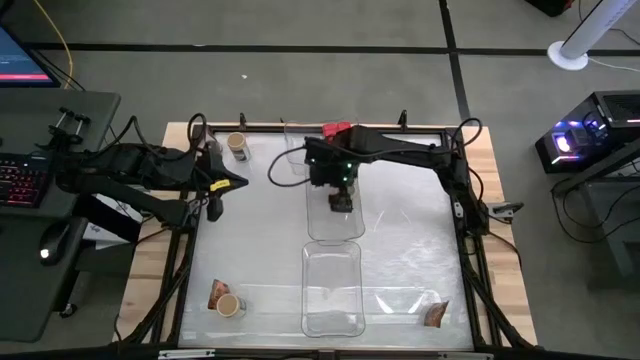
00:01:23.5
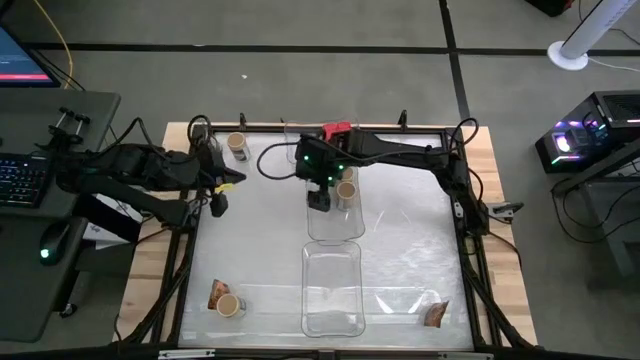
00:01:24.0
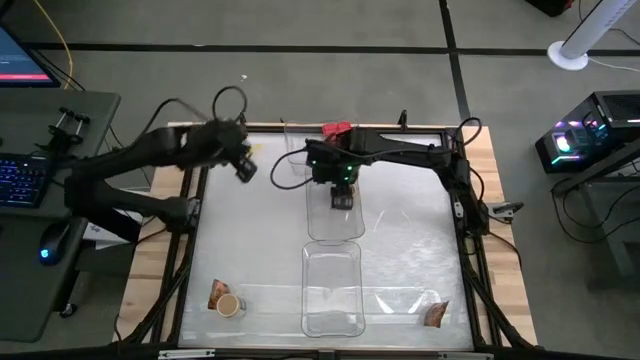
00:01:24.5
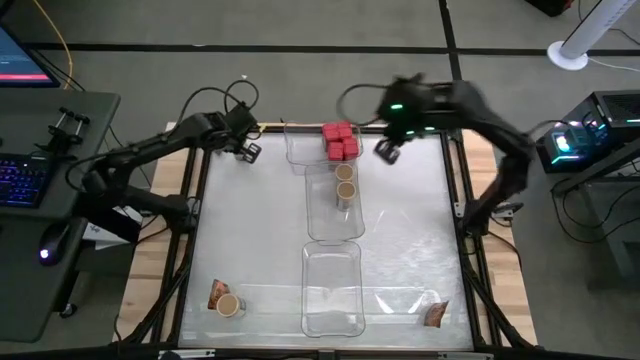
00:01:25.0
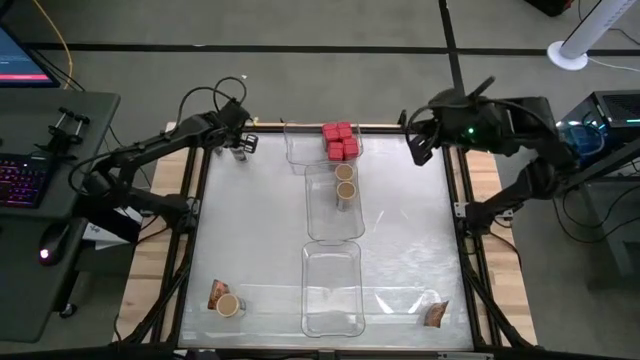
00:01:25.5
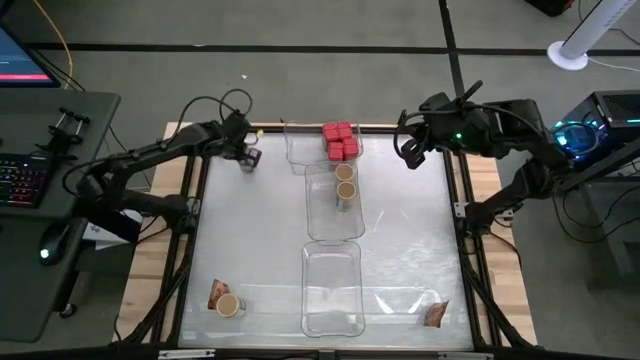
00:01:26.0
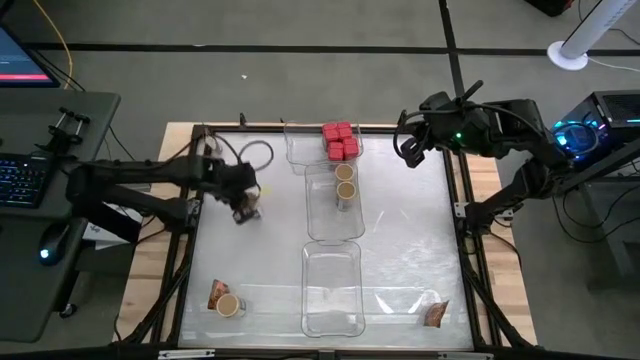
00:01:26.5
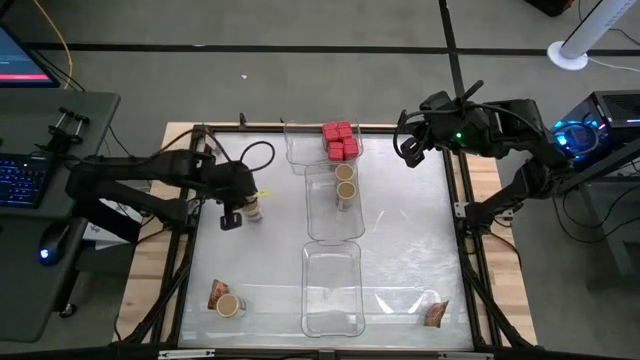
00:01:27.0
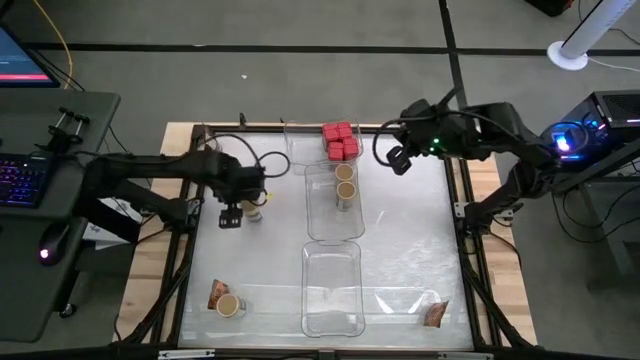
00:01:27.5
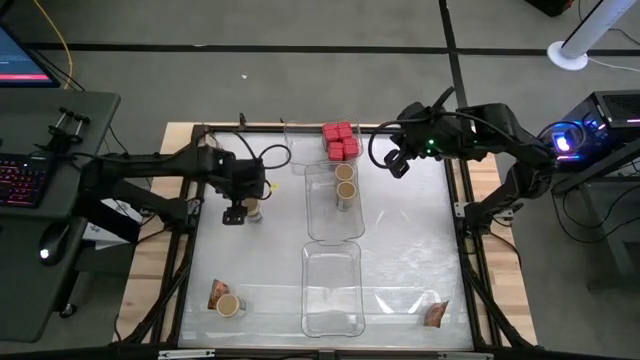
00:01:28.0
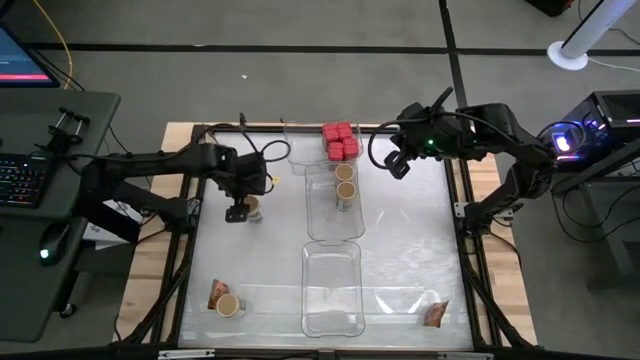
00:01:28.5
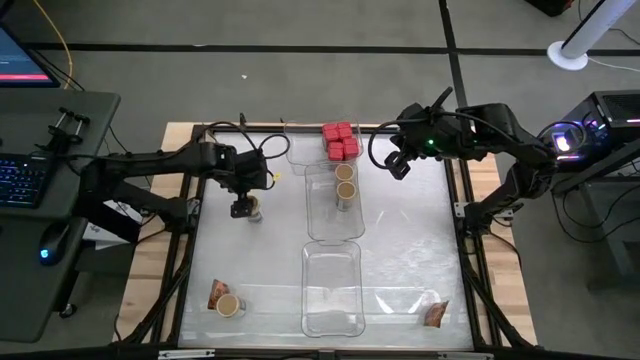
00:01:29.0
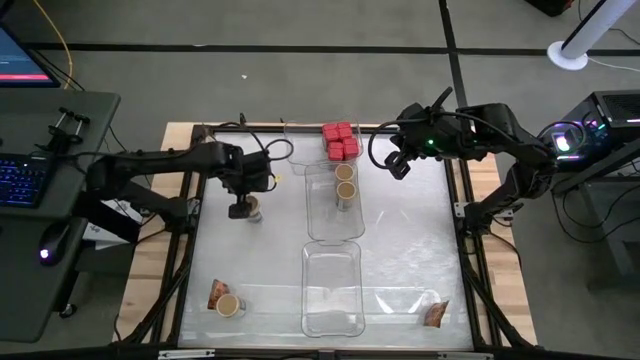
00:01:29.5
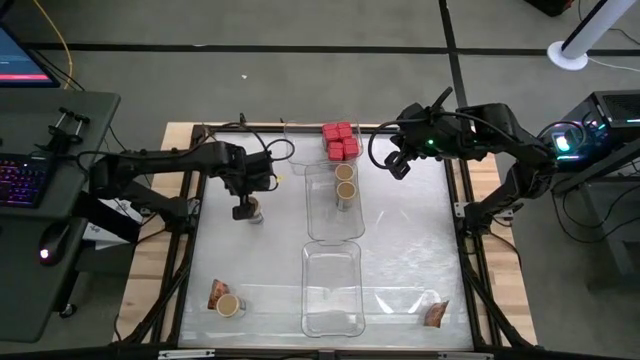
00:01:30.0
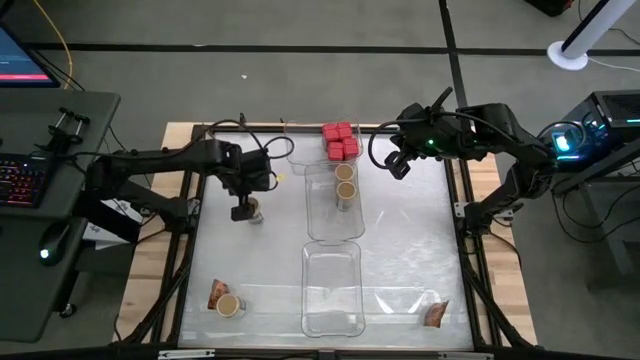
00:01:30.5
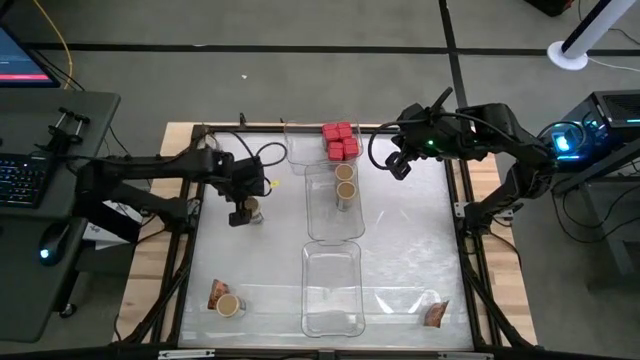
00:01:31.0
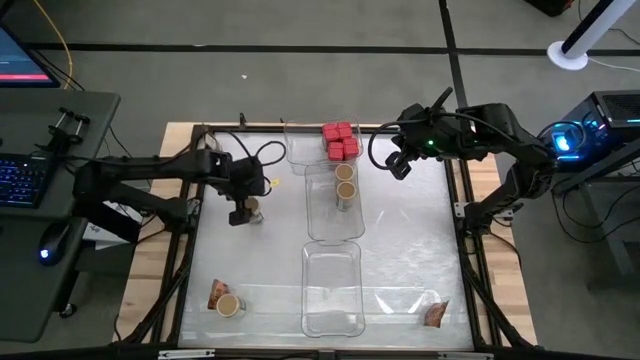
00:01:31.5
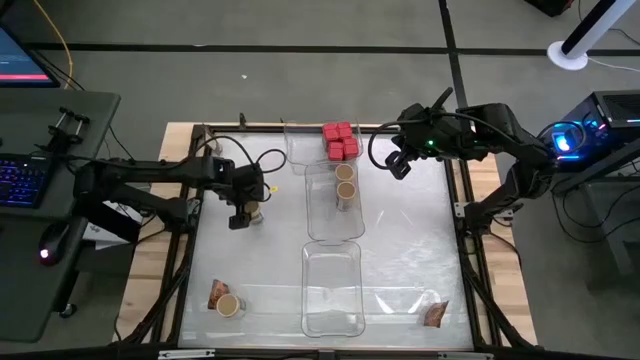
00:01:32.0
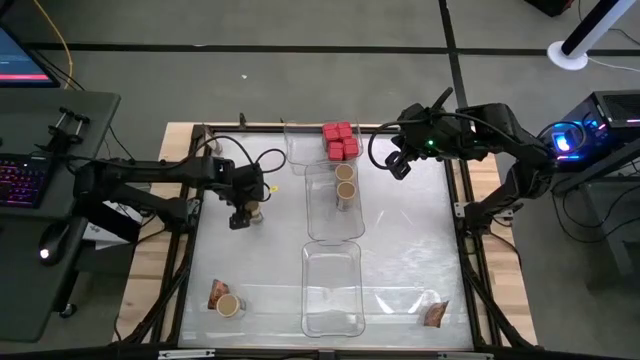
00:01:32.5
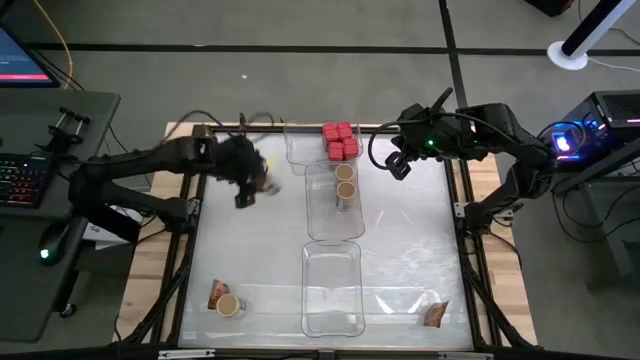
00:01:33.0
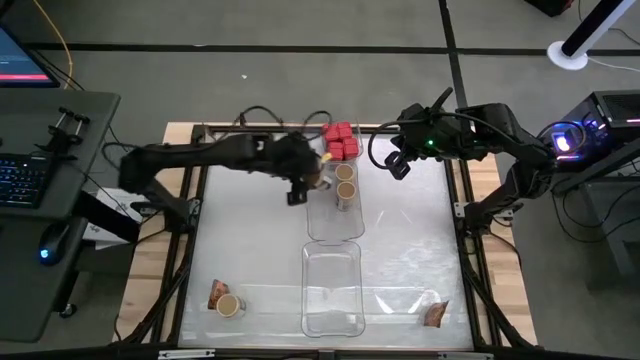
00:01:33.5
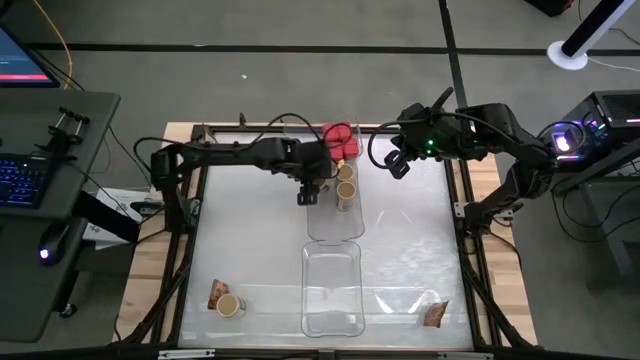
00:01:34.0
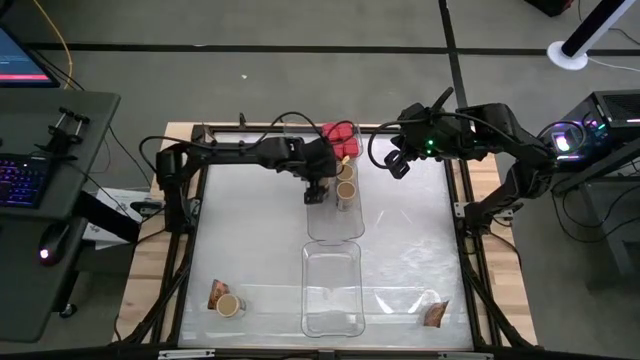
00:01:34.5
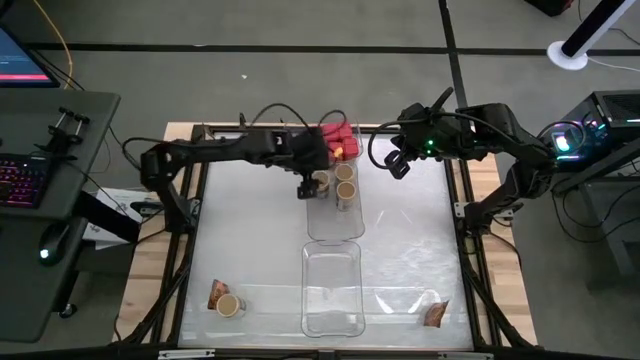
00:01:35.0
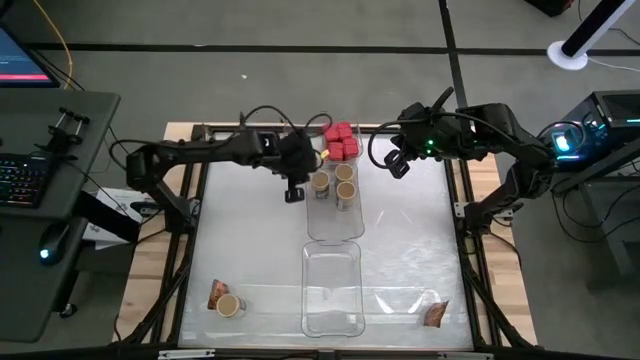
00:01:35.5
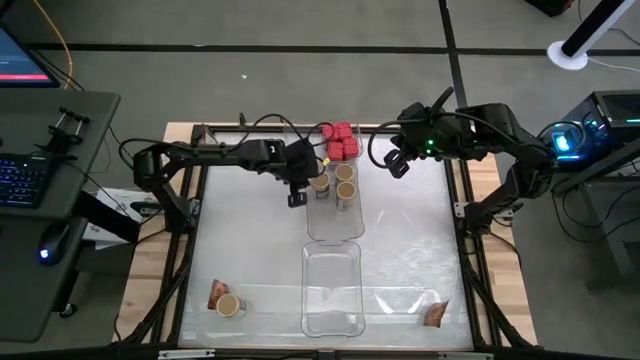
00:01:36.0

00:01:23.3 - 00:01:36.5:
Task: Sort spices by type
Put the top gold seasoning bottle into the center transparent bin

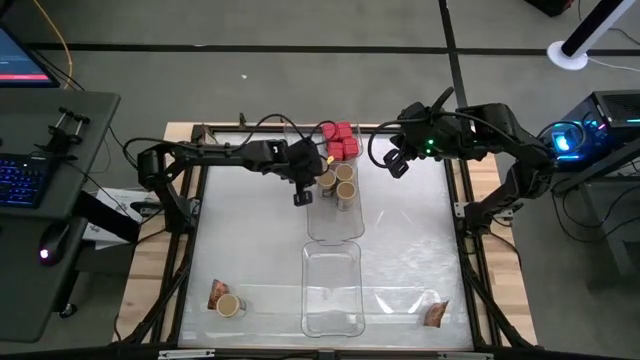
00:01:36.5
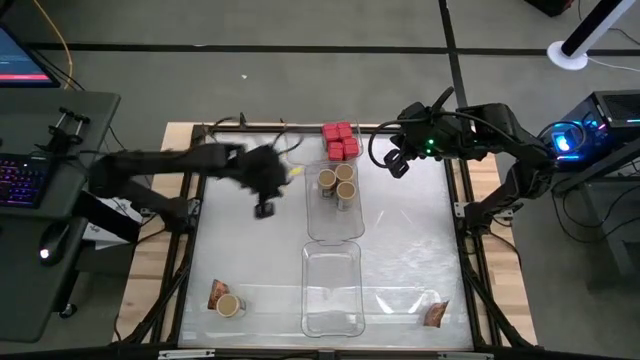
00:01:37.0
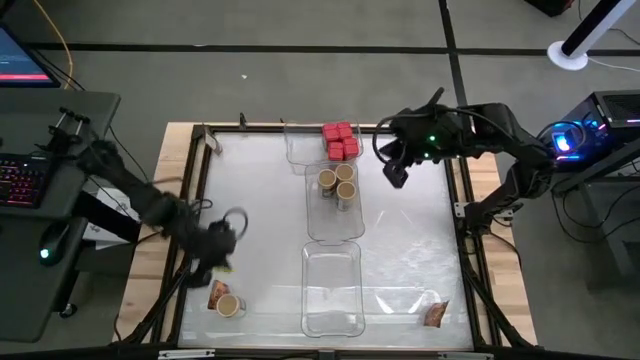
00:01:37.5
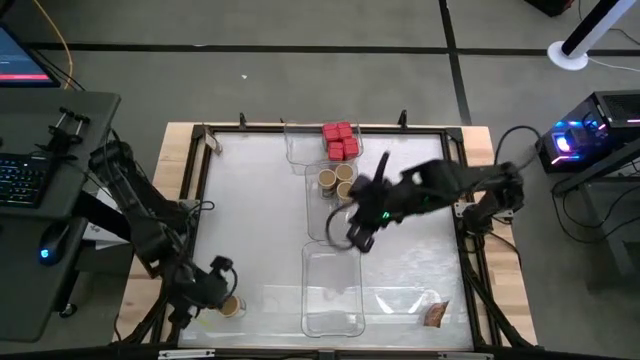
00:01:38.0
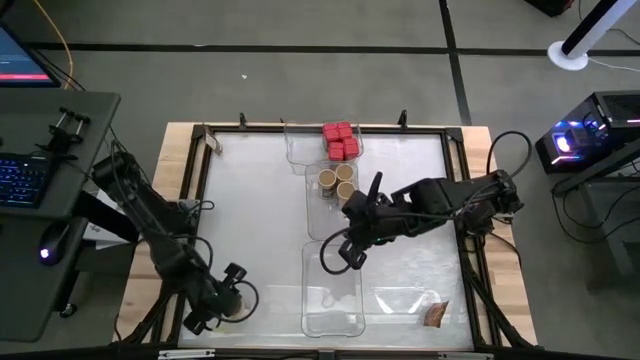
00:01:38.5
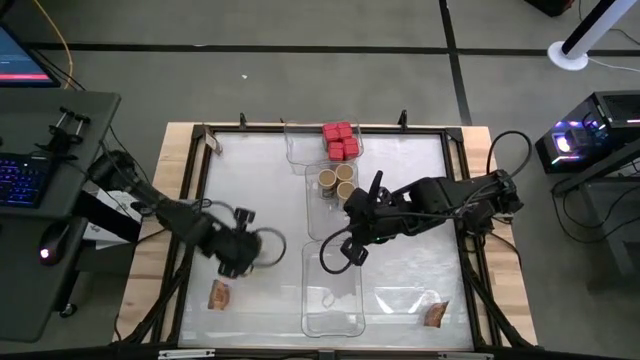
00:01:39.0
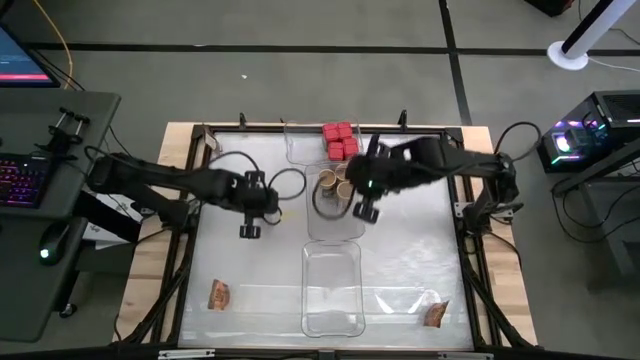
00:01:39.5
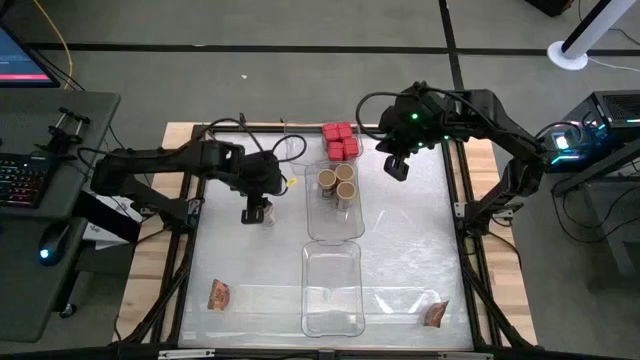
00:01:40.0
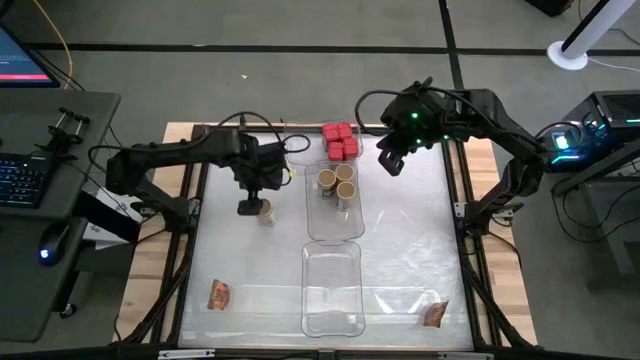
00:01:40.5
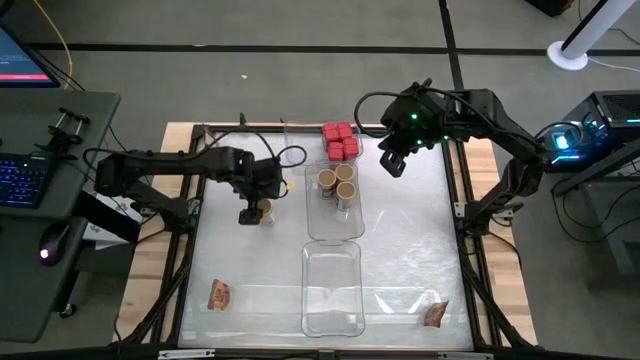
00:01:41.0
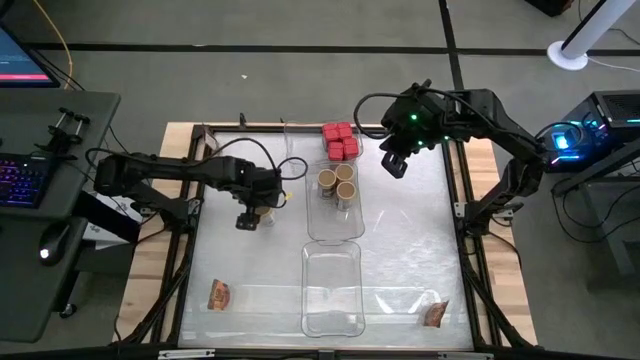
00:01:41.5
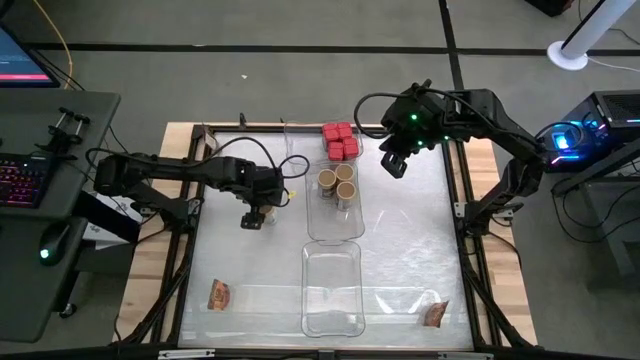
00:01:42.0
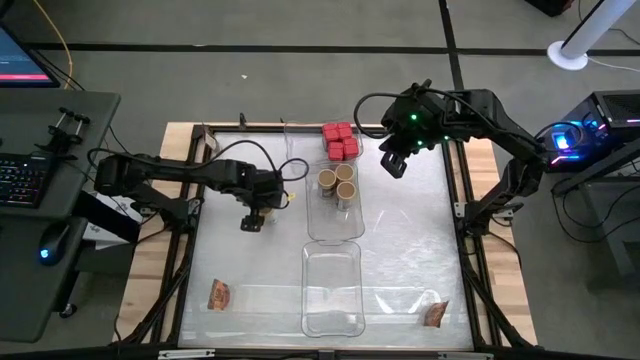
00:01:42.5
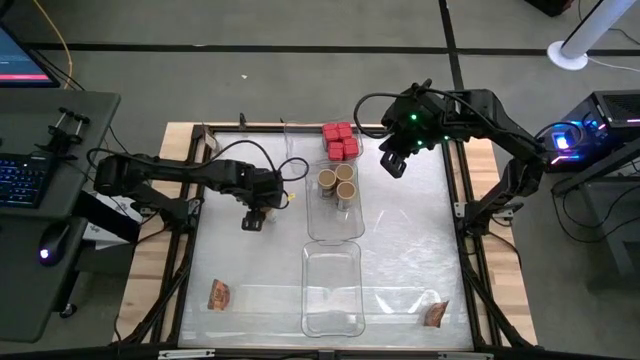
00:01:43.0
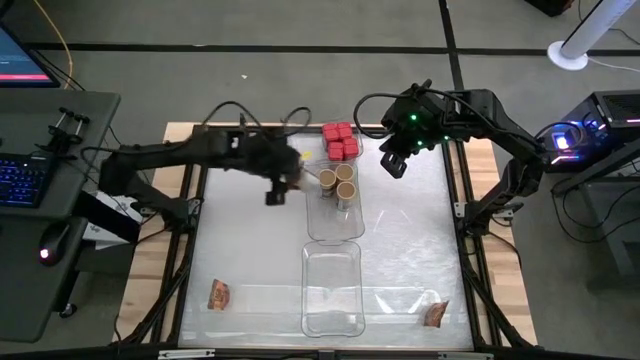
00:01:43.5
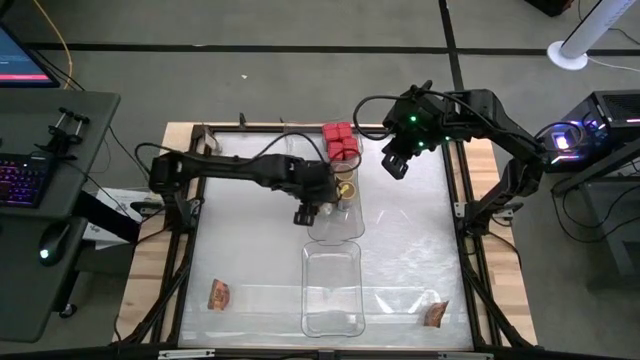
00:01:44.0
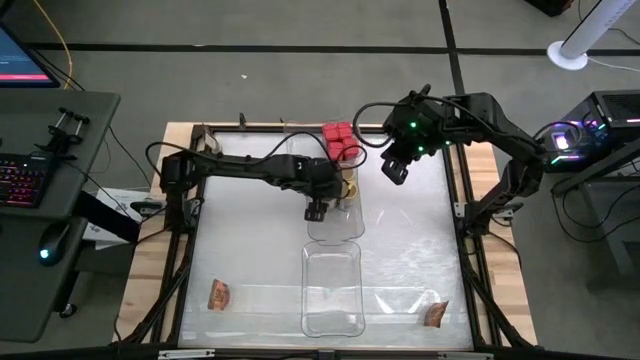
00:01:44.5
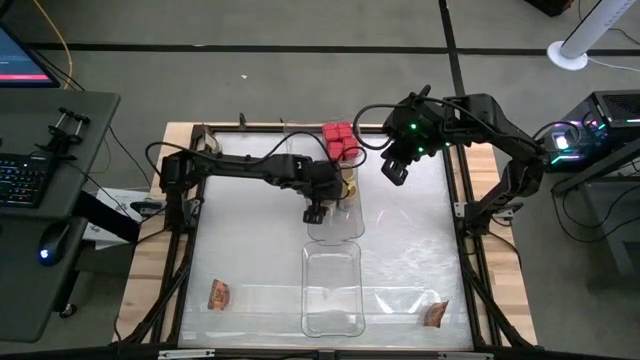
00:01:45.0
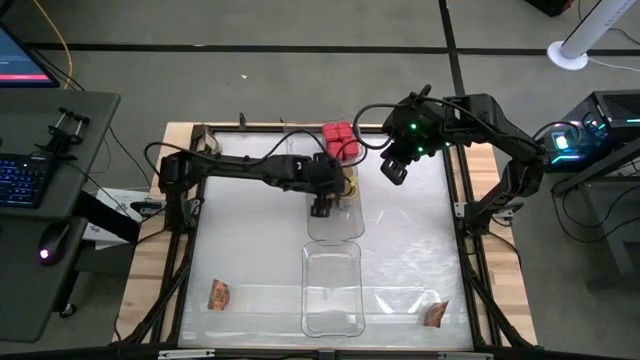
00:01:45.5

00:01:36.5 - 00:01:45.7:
Put the gold seasoning bottle into the center transparent bin
